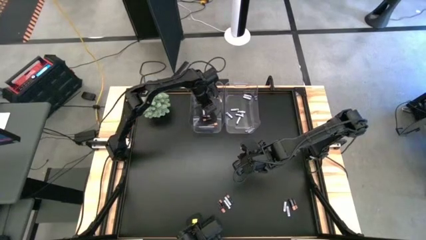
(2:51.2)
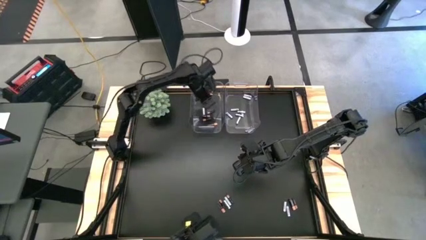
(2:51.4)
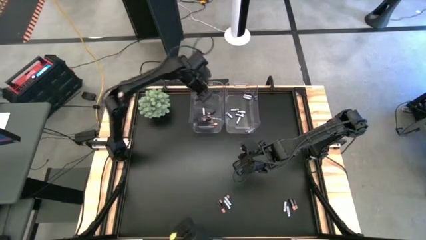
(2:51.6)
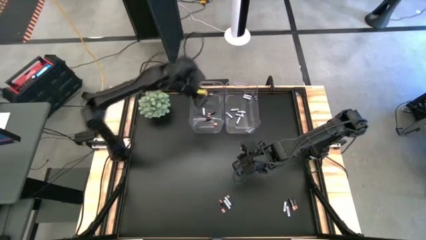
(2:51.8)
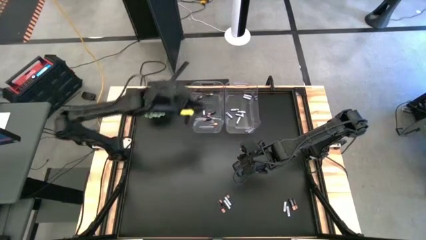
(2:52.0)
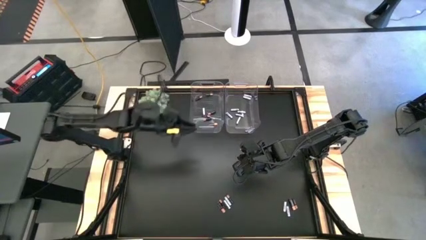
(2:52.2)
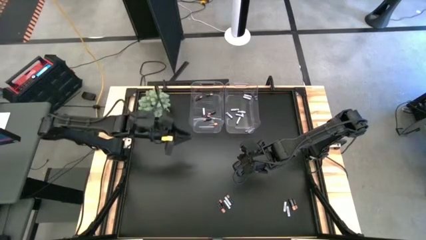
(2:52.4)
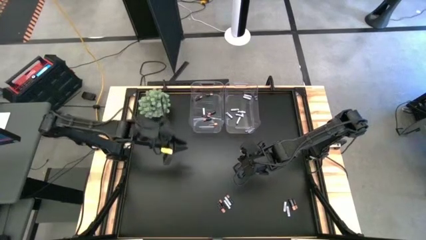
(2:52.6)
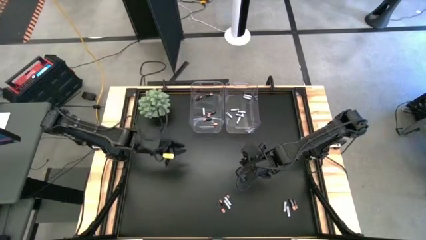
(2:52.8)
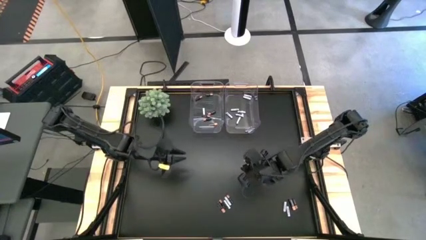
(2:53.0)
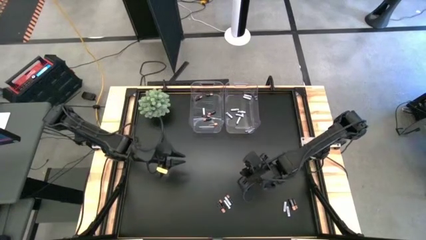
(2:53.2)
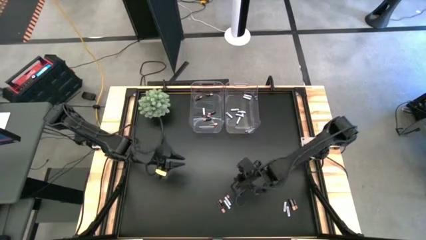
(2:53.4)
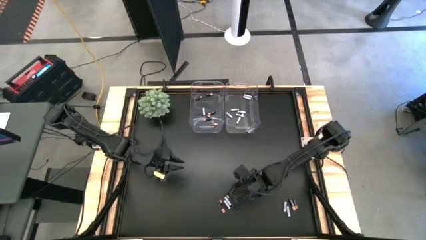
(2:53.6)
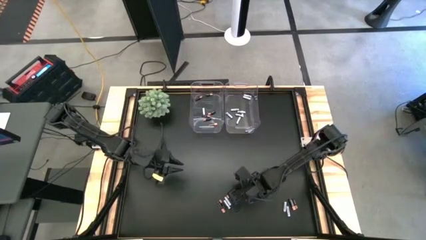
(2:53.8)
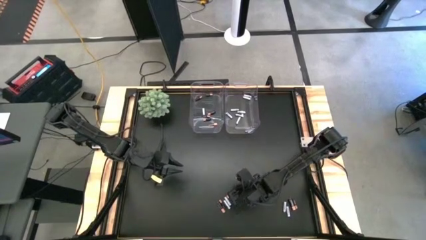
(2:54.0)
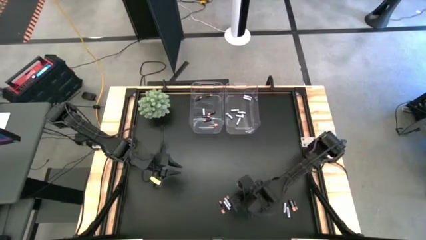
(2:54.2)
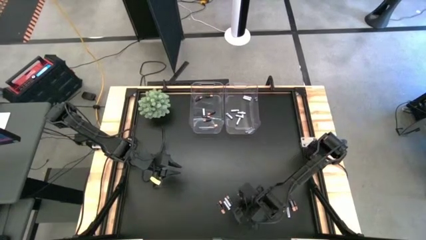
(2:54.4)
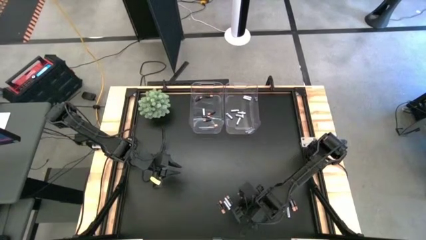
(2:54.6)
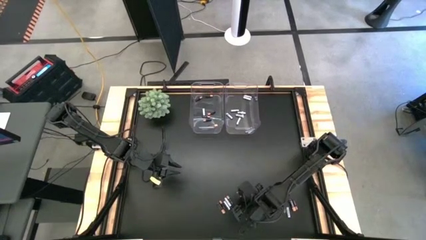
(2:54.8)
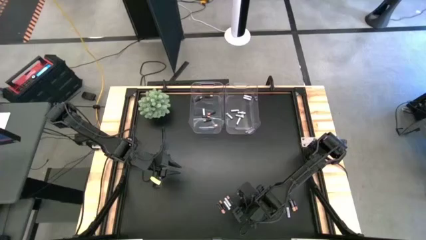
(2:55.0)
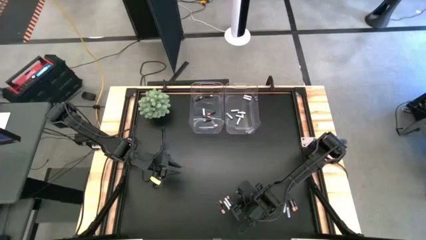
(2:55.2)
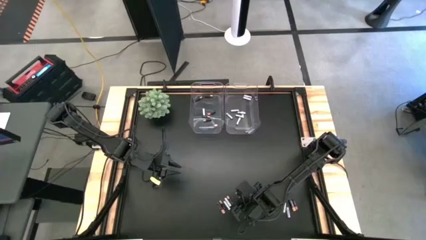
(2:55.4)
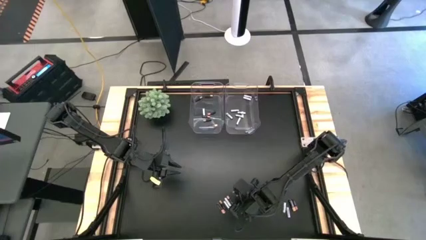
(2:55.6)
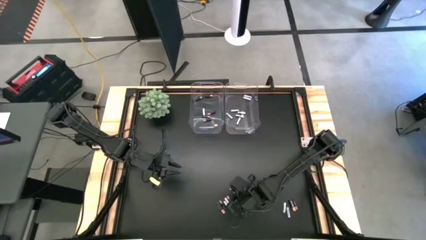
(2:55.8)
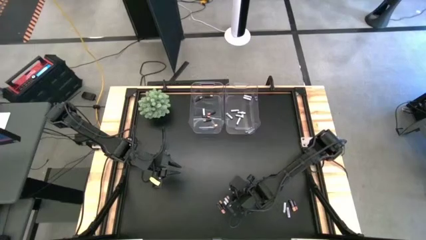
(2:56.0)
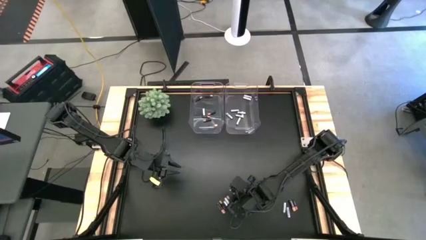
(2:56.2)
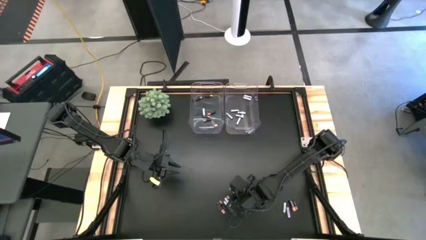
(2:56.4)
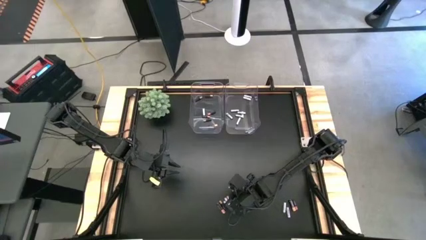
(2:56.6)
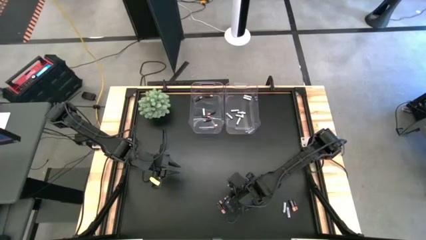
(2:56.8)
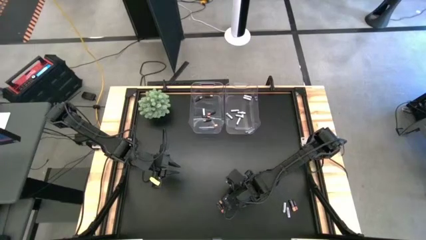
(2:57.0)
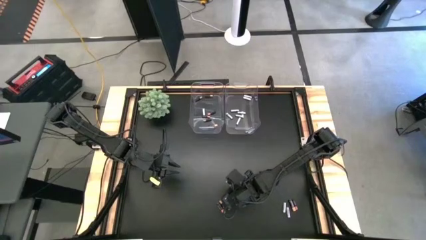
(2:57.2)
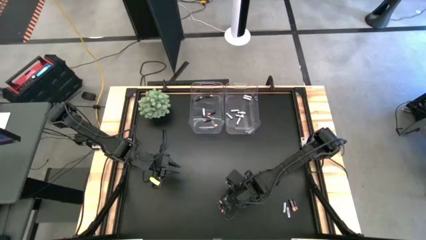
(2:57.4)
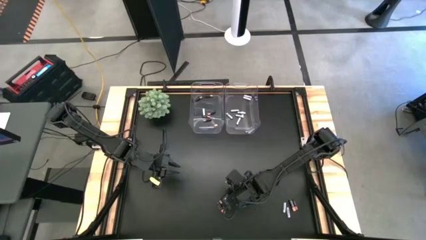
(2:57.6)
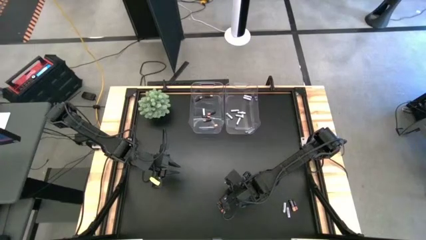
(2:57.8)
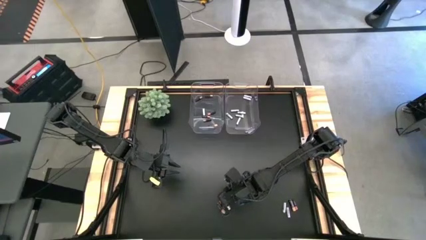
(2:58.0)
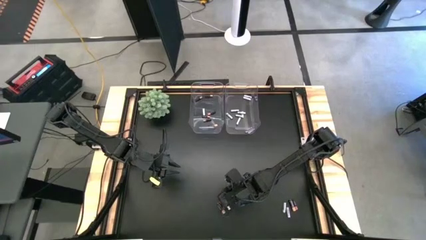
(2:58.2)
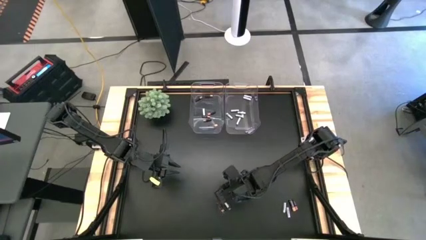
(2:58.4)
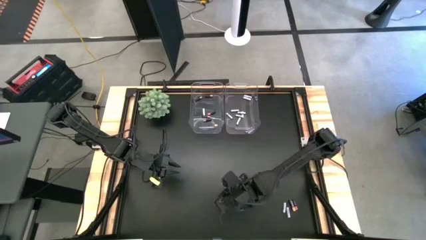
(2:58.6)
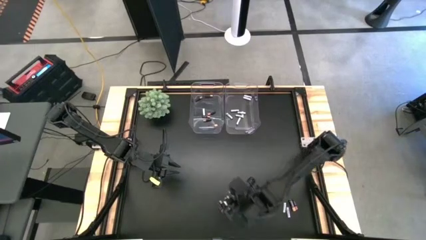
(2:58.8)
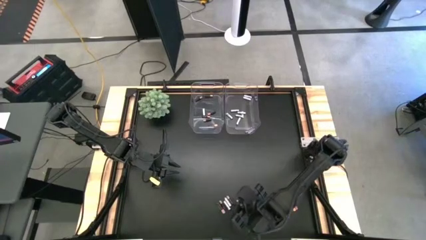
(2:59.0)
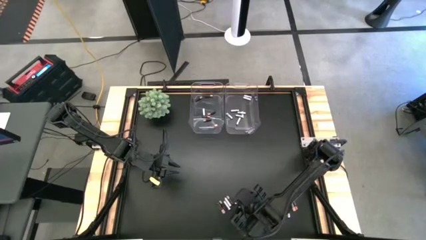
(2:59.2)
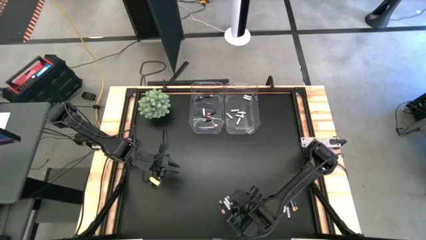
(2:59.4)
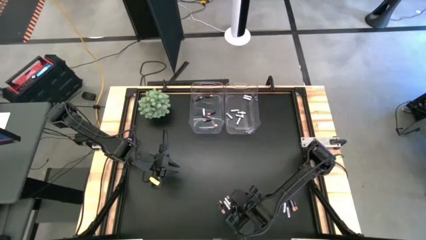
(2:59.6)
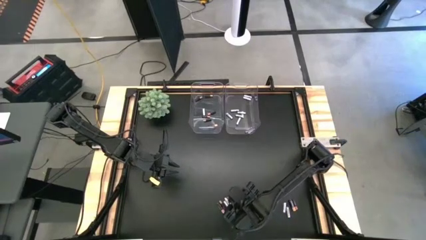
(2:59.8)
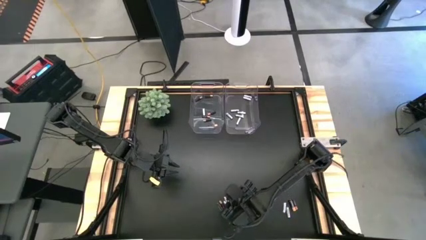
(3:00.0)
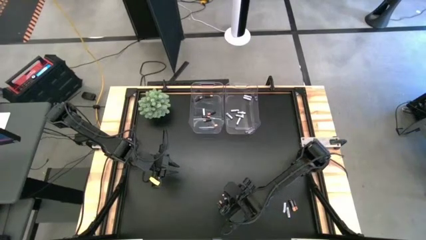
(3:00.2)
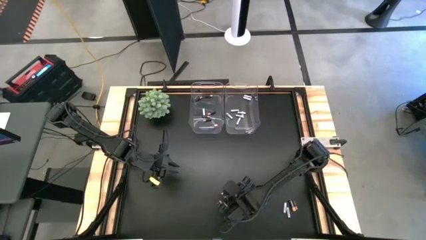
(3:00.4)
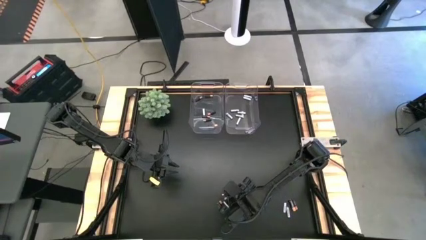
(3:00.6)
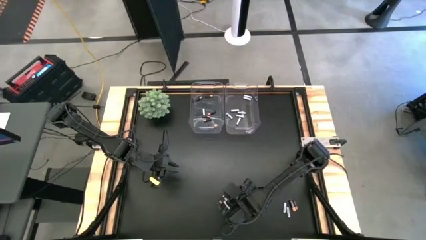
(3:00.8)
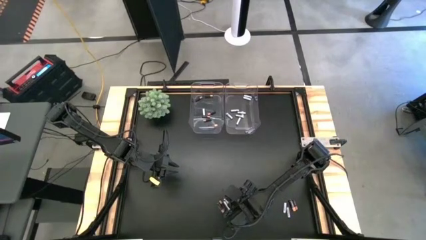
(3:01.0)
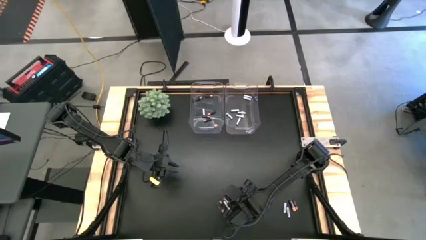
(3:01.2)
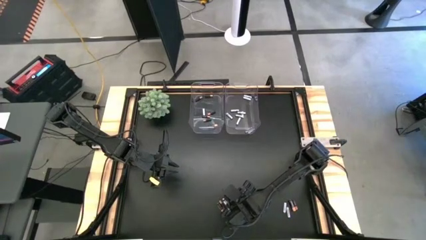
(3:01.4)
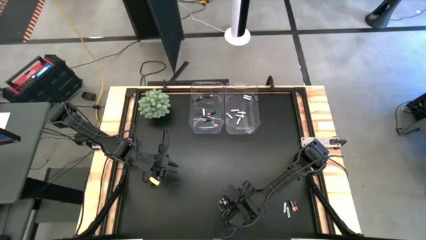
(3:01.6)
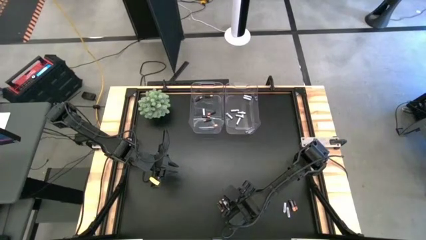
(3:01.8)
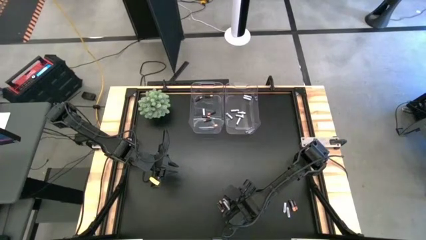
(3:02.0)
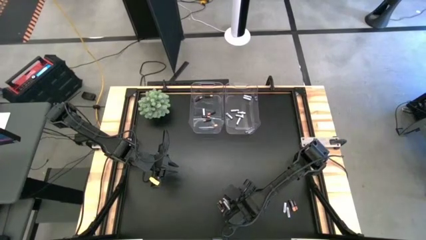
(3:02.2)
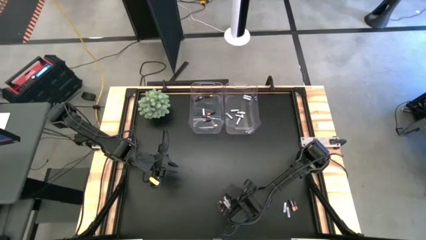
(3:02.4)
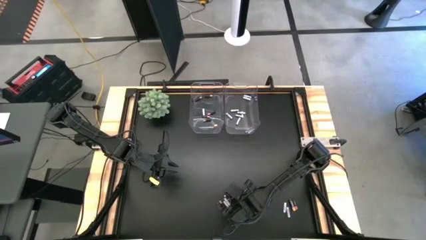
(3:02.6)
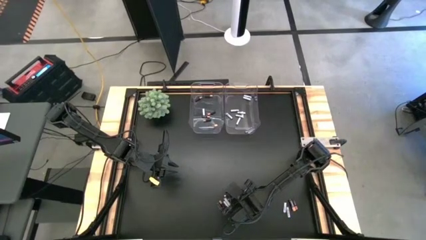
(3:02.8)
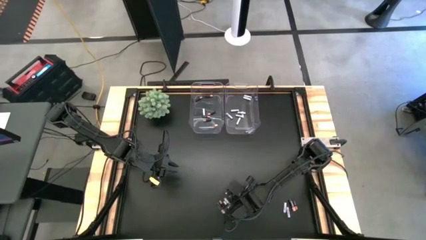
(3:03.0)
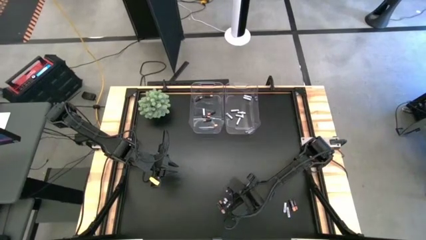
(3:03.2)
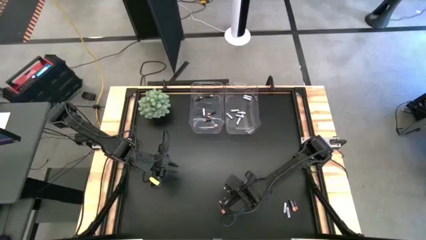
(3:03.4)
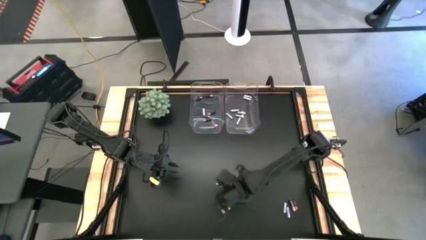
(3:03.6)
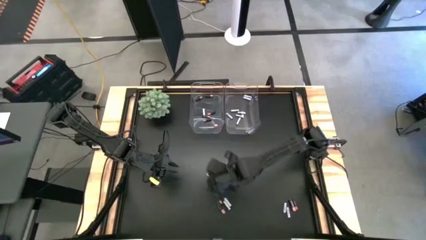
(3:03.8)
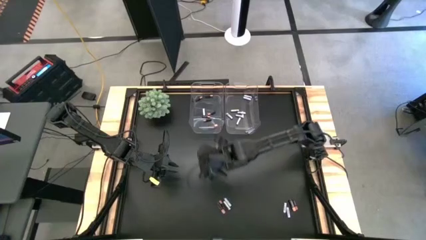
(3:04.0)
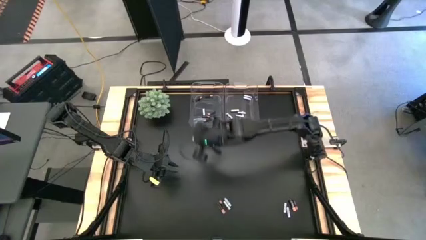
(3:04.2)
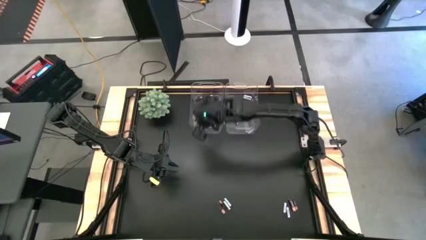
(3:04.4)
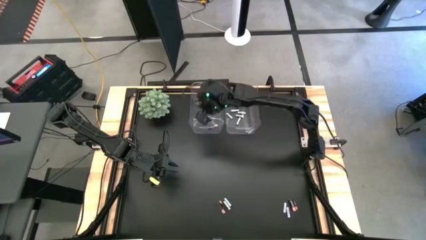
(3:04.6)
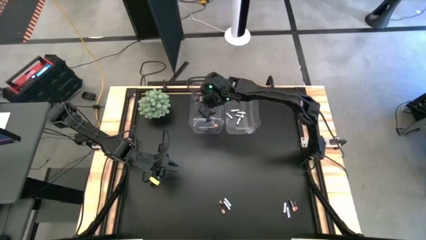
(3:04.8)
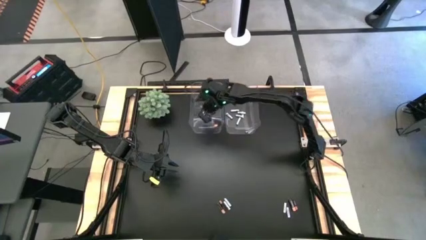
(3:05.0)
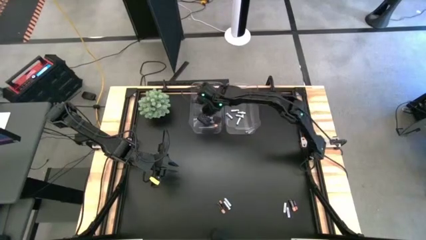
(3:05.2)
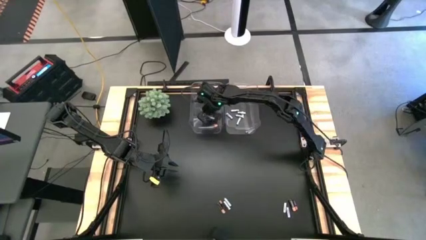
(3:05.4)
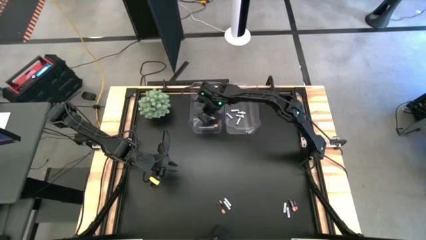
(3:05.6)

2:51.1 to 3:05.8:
Task: Sort batteries
Put the small black battery into the left transparent bin

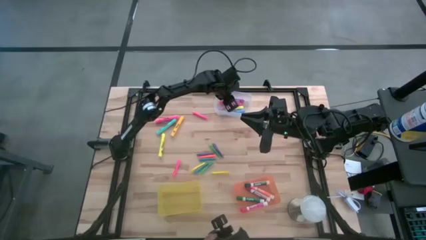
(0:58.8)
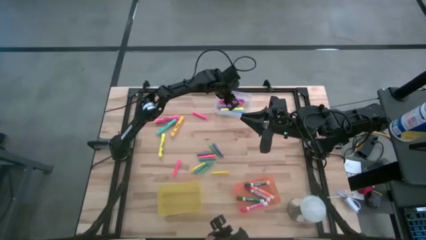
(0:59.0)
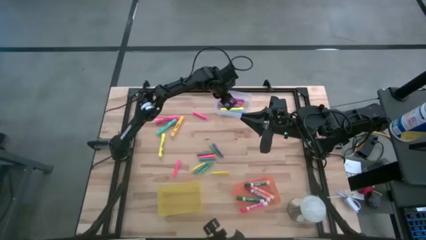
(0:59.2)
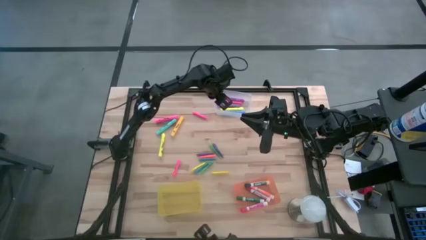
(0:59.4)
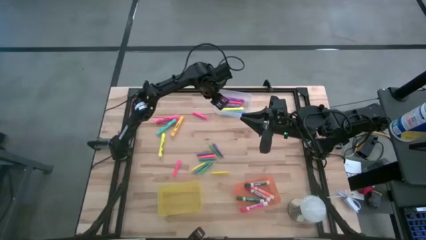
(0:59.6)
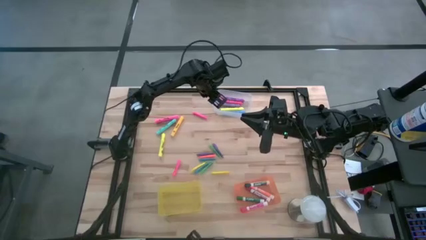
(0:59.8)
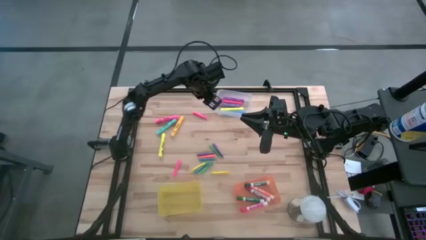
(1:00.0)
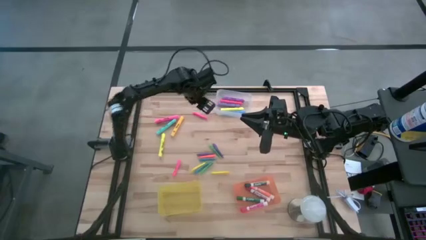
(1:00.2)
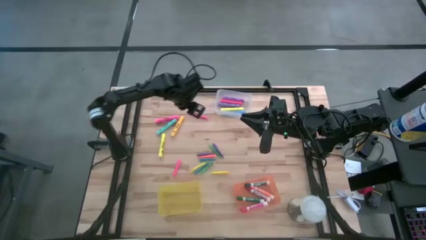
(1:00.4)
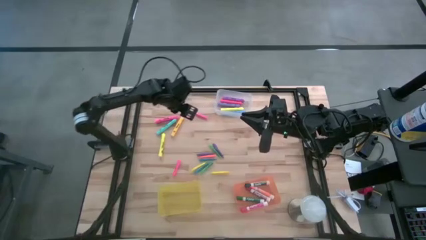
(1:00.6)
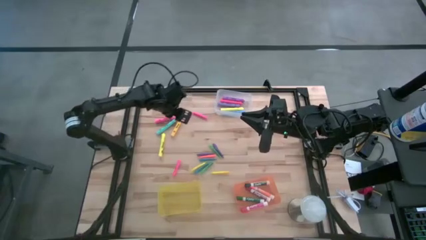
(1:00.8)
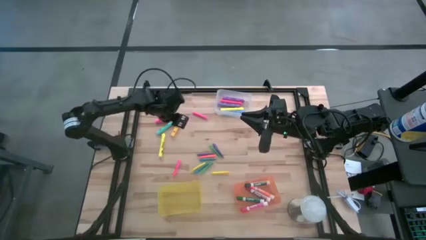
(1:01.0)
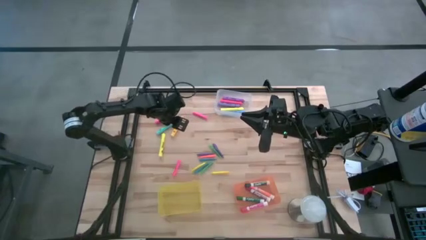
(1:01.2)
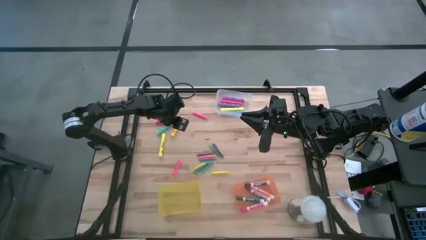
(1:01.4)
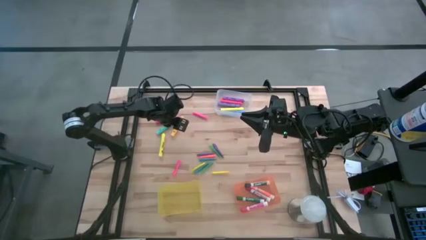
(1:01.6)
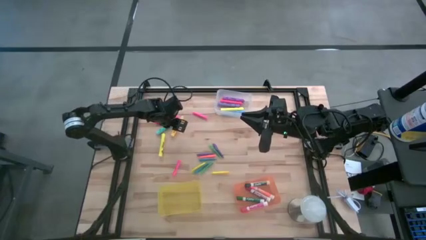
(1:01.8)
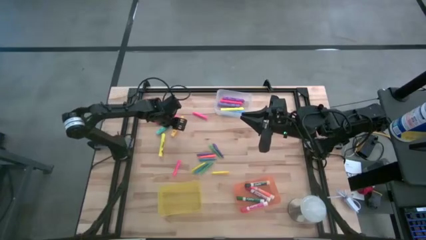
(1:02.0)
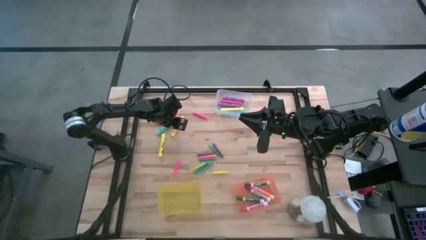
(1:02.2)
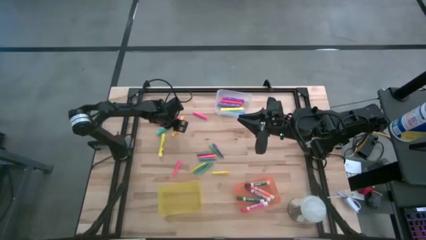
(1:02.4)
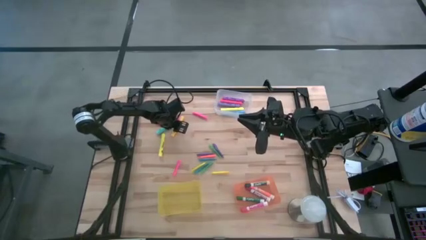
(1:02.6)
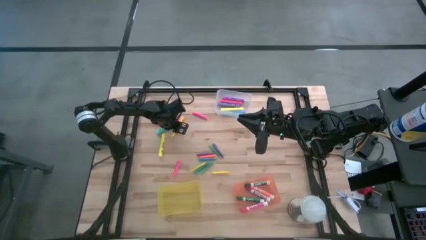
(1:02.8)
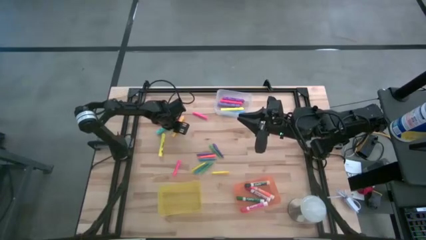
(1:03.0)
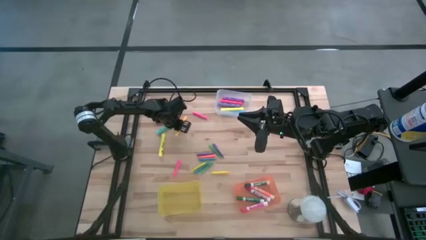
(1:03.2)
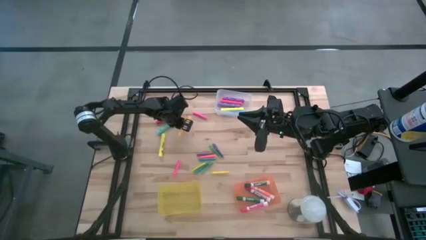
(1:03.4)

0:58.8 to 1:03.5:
Task: Pick & Place Markers
Put the orange highlighter pen into the transparent bin
